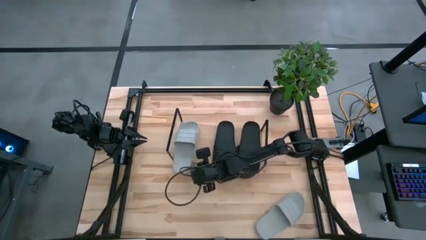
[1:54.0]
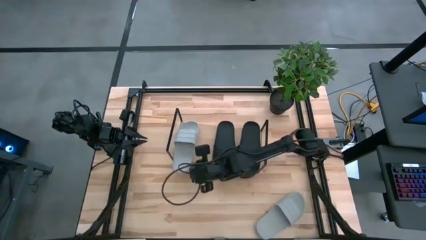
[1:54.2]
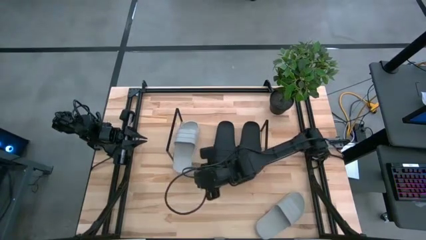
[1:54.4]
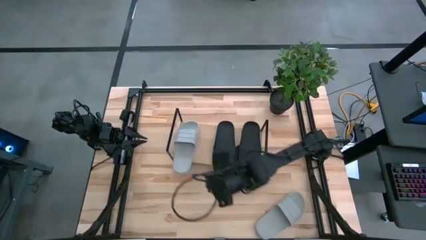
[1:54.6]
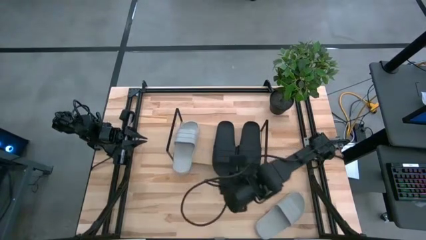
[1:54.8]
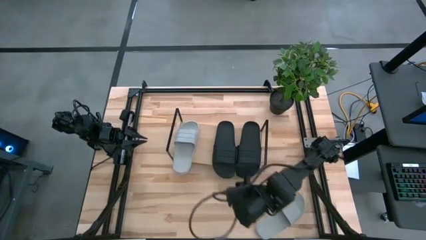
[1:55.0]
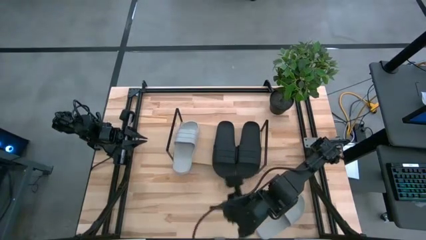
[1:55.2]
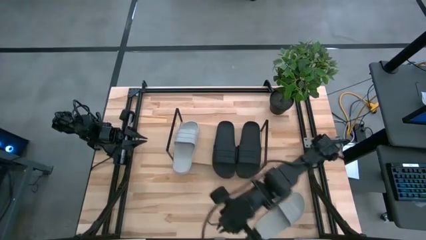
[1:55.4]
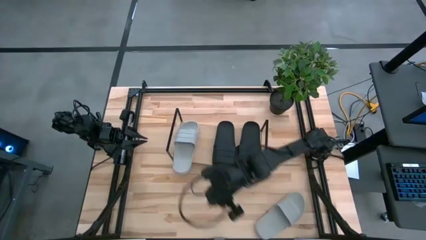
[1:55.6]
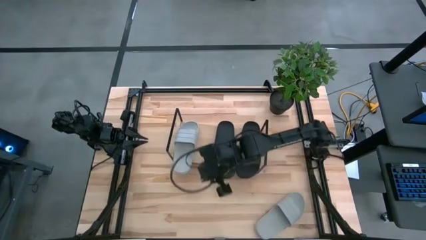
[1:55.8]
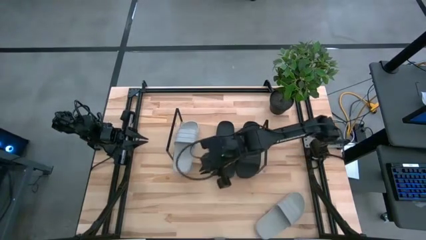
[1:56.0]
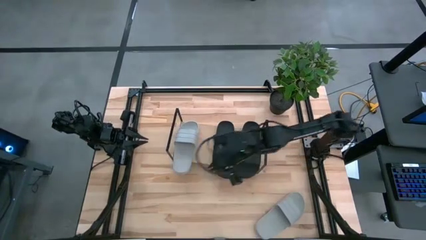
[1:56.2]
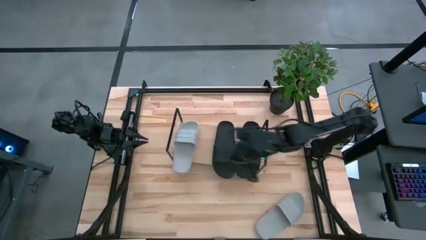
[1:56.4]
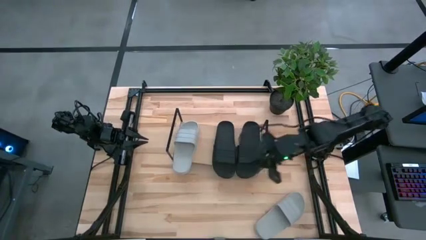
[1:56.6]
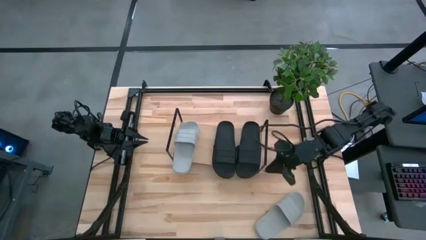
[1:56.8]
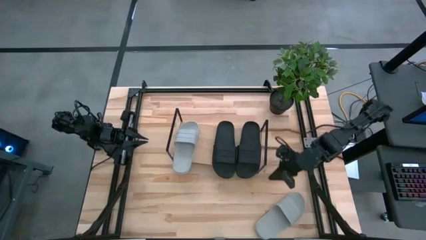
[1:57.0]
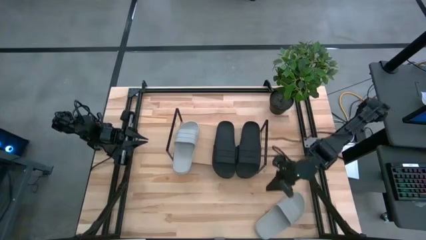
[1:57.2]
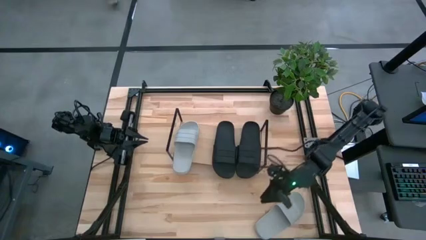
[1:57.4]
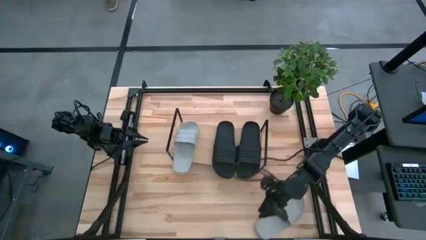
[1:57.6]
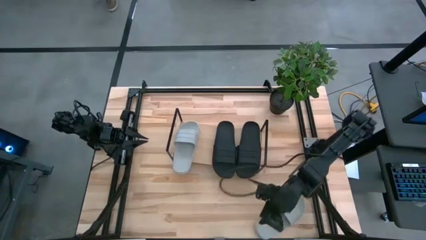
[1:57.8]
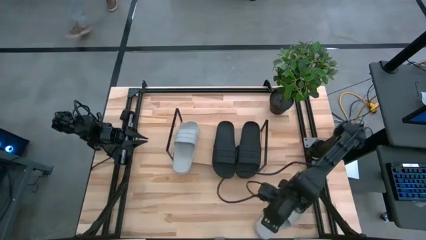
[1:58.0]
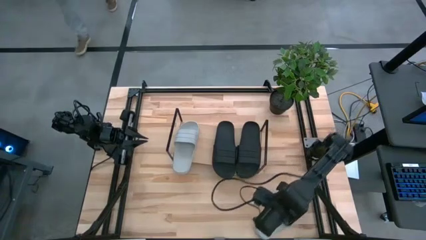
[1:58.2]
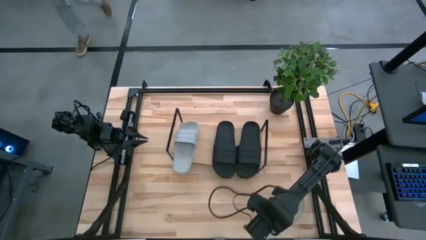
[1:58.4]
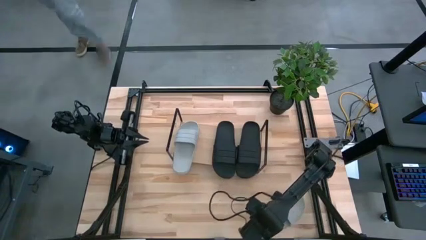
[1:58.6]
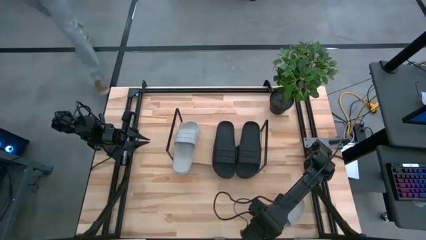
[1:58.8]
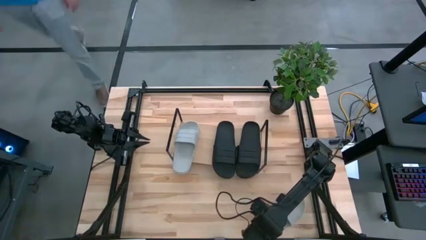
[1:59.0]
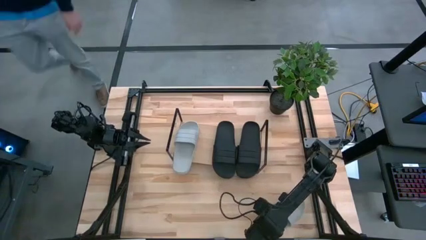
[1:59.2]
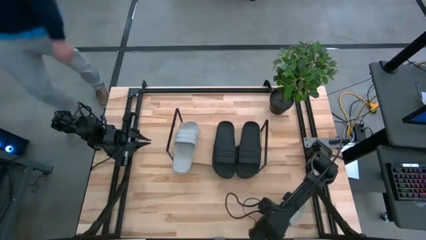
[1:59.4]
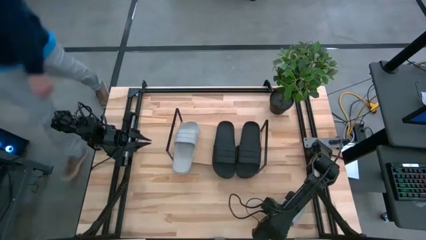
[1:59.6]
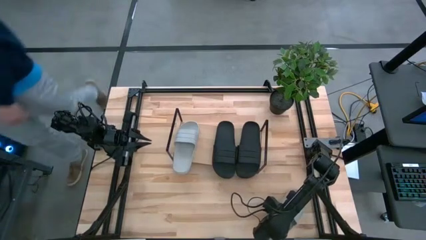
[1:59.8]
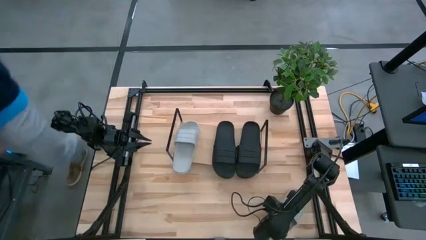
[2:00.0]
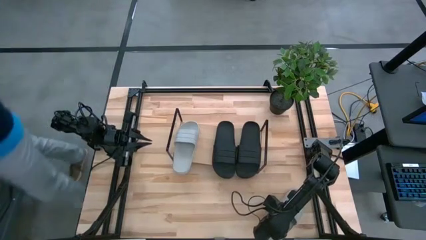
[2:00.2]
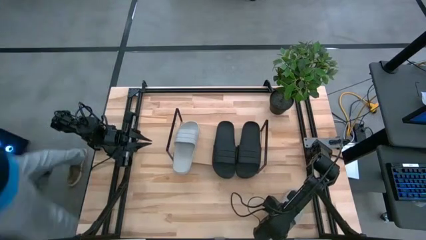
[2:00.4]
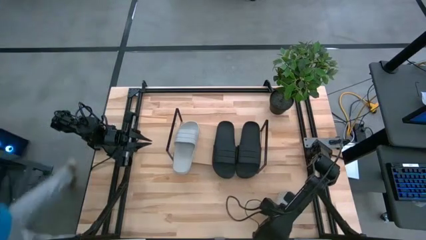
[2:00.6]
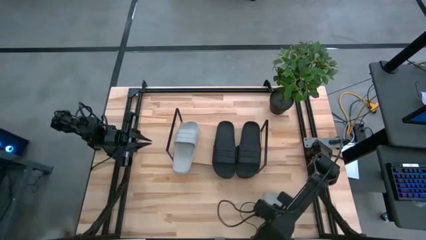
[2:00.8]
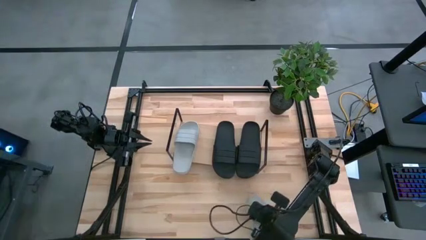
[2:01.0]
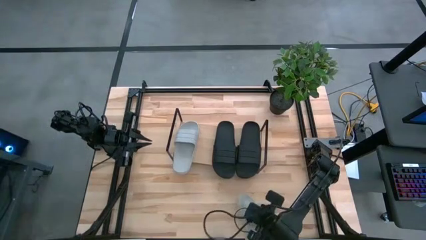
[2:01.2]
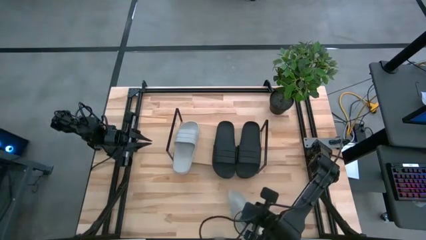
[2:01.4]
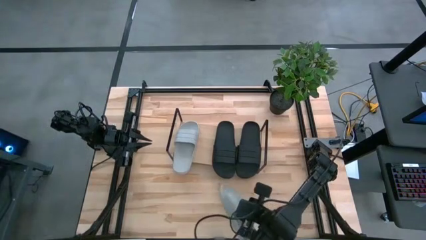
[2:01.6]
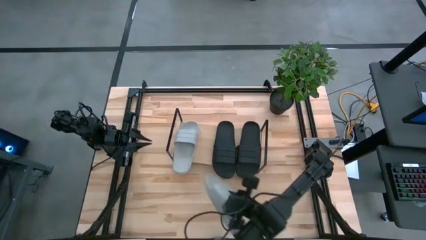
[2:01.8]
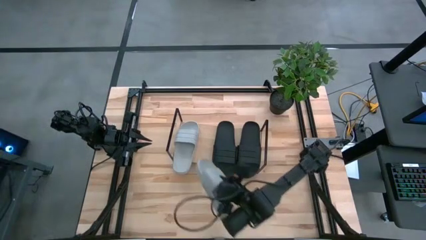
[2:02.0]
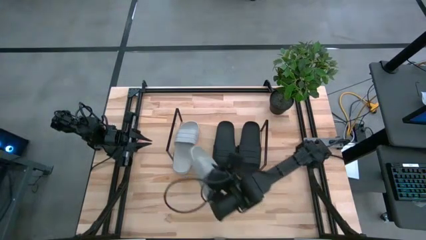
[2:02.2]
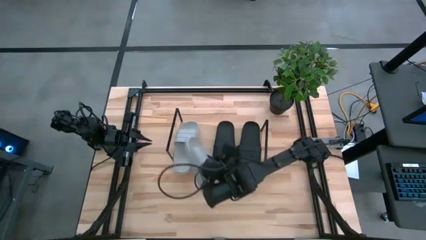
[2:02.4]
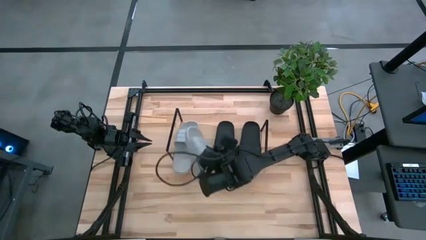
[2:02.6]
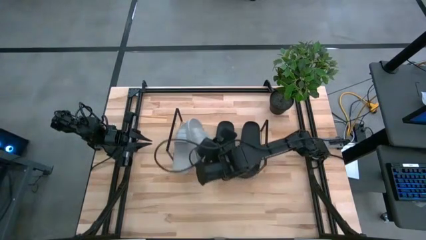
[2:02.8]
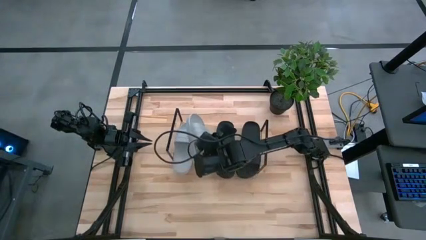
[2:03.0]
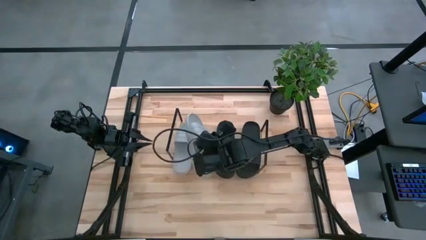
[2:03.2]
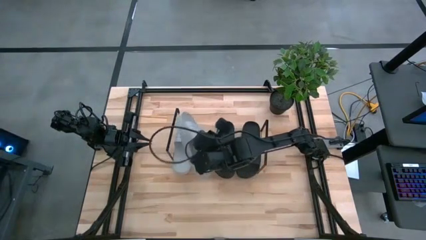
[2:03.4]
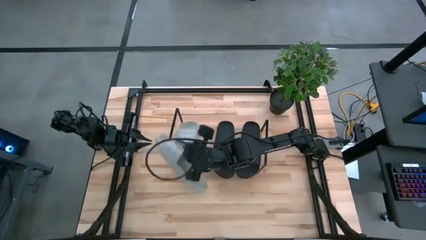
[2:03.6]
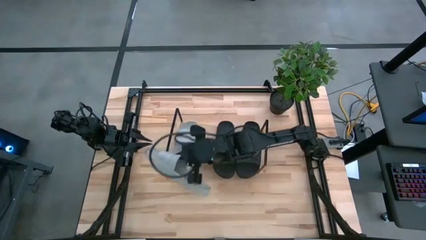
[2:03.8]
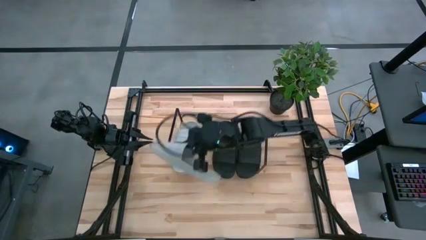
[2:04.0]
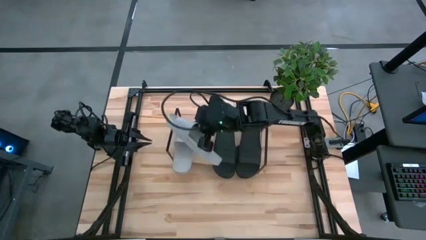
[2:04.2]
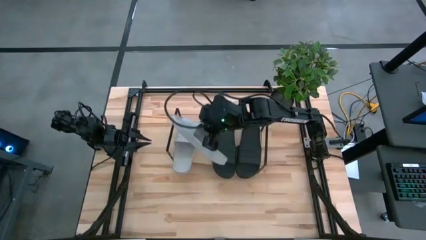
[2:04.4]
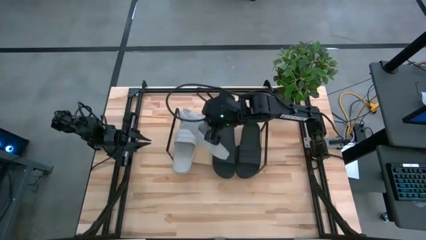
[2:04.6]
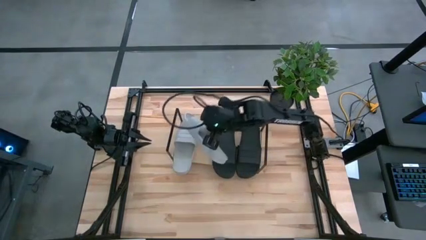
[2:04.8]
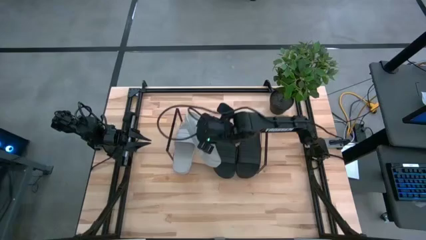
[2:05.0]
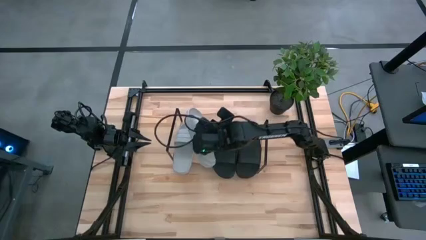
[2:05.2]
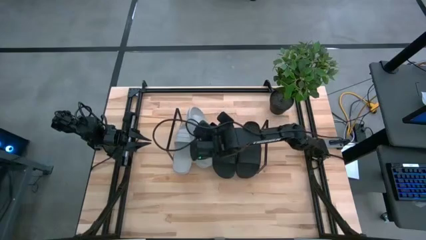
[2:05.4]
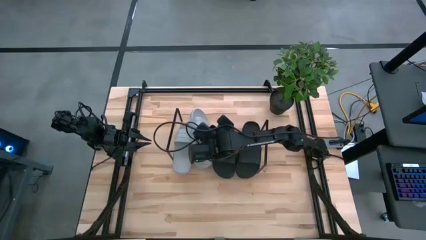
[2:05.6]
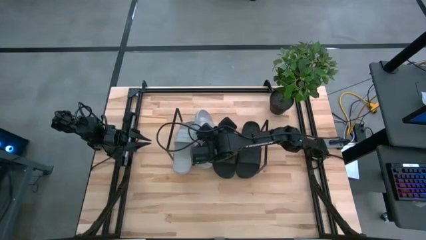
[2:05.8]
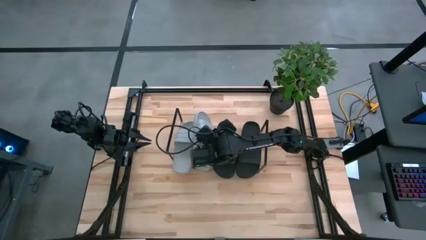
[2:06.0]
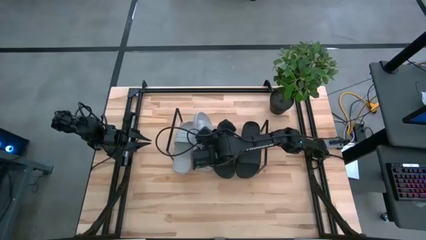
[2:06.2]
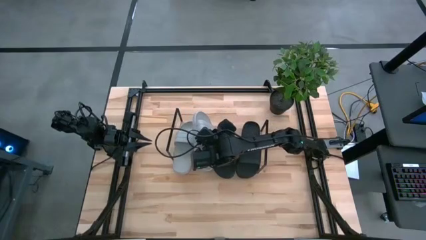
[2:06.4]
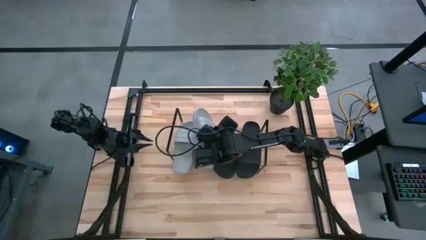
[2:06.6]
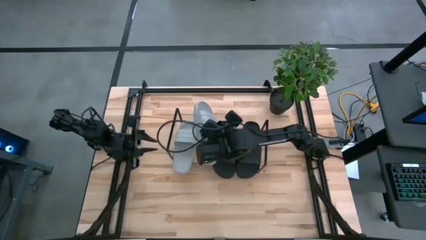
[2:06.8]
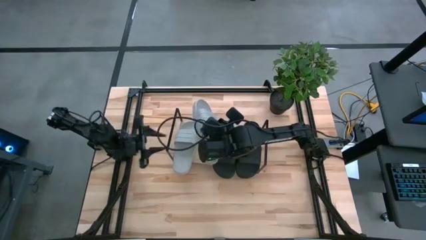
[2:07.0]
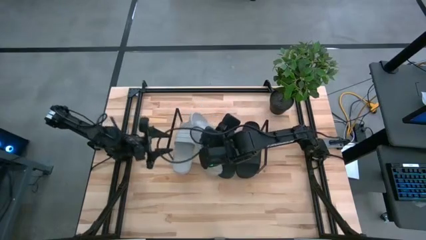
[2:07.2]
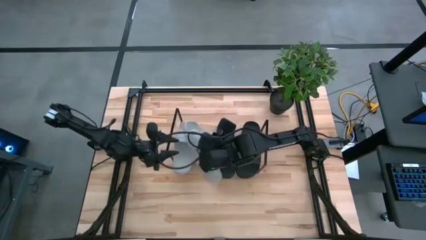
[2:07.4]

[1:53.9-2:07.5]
Task: Pick and place slides into the shelf
Put the gray slides on the shelf

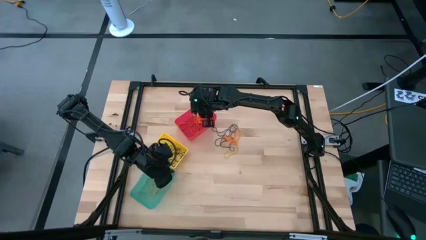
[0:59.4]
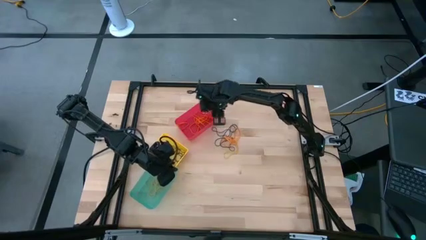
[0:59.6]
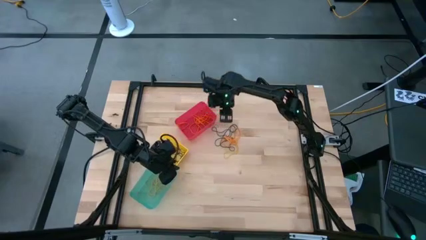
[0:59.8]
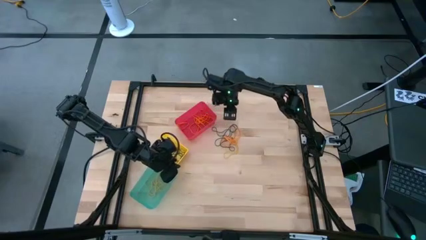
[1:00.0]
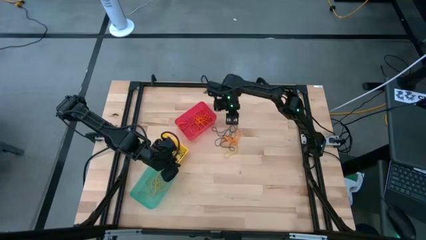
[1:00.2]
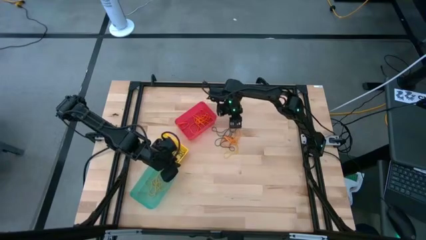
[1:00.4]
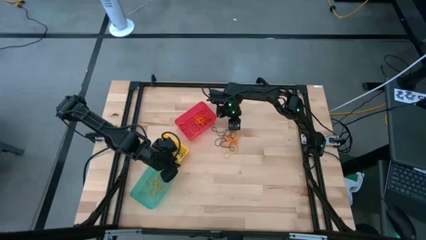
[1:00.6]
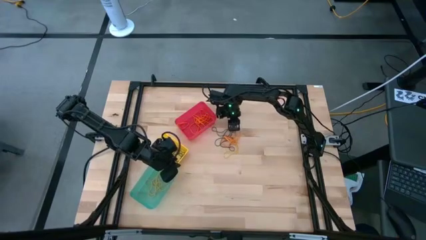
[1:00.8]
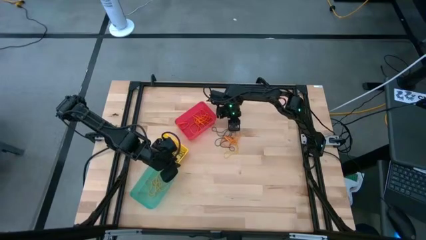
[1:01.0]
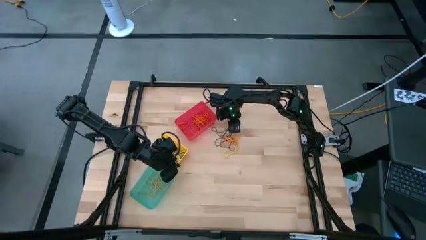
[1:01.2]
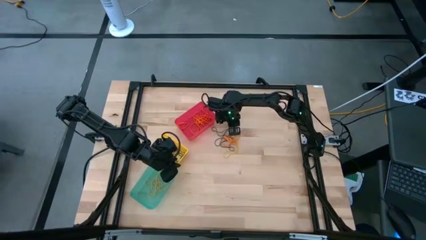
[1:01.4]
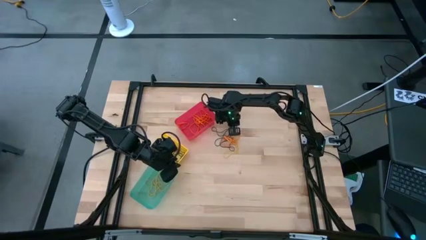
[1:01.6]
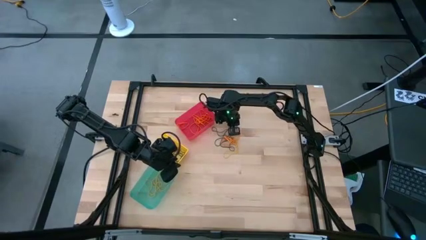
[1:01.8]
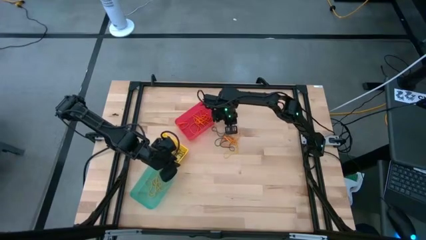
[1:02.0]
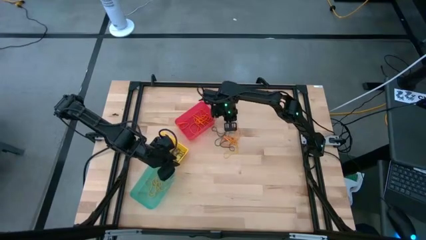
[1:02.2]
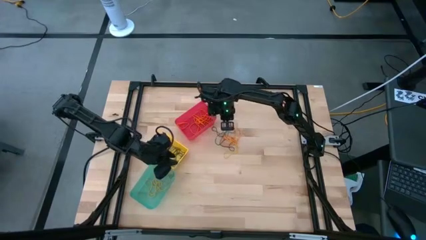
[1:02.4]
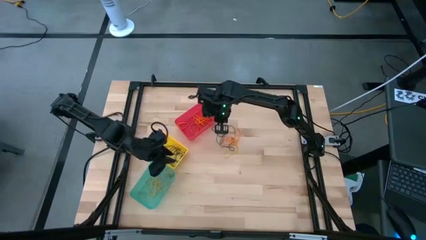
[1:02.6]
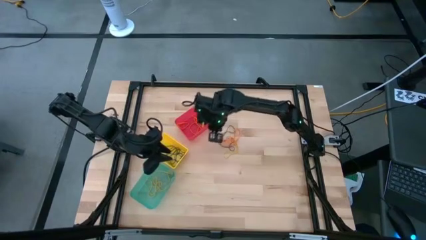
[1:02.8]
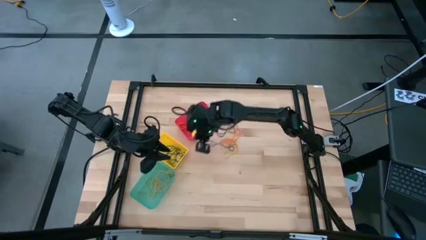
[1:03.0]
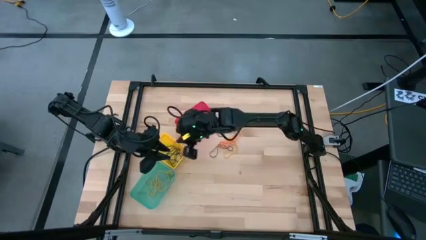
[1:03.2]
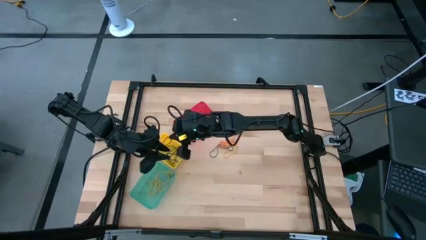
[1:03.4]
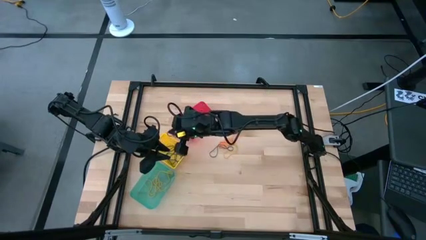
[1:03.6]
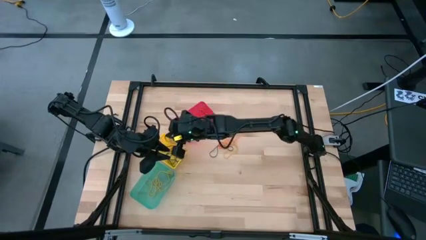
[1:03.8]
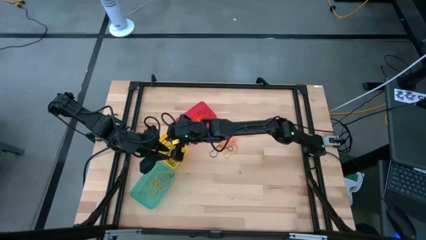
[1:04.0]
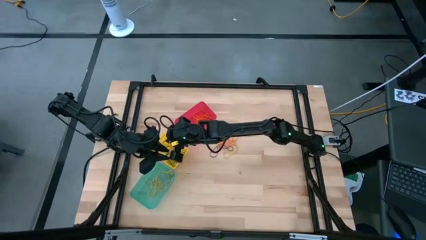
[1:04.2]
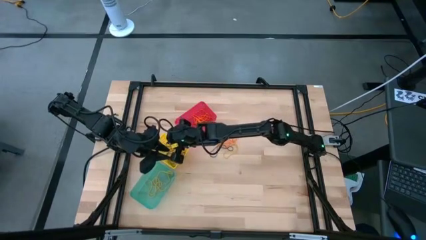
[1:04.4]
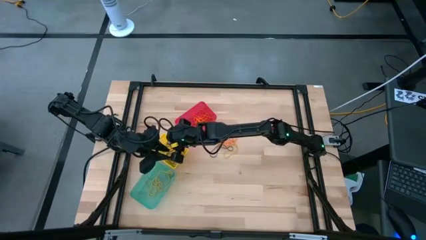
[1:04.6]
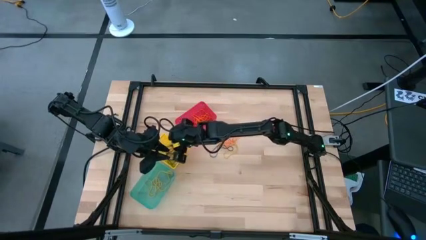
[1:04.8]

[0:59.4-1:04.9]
Task: Sort rubber bands into baskets
Put the black rubber band into the yellow bin
